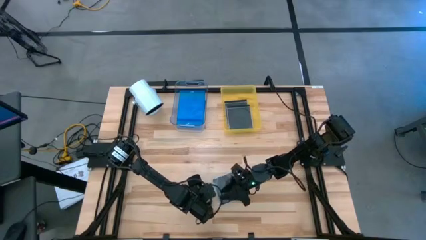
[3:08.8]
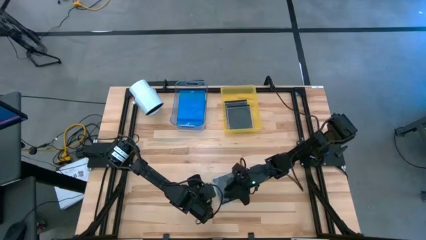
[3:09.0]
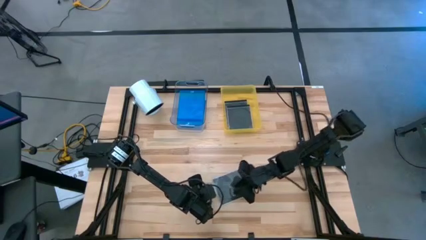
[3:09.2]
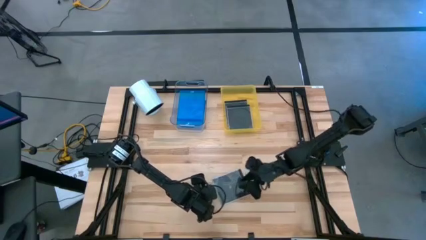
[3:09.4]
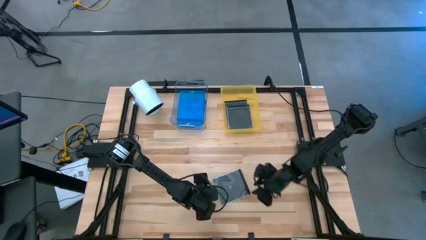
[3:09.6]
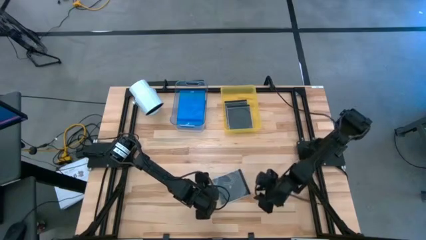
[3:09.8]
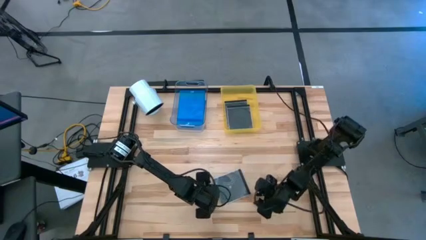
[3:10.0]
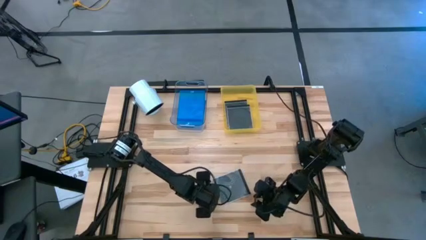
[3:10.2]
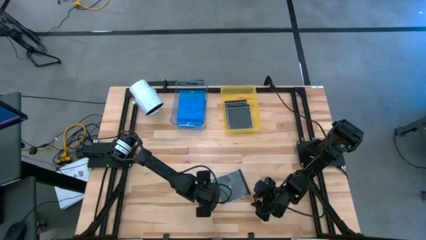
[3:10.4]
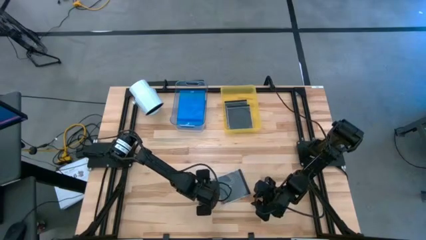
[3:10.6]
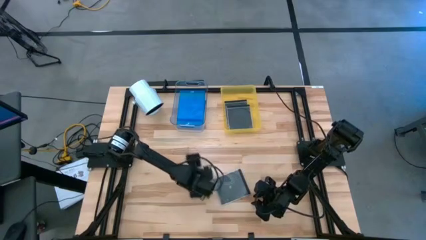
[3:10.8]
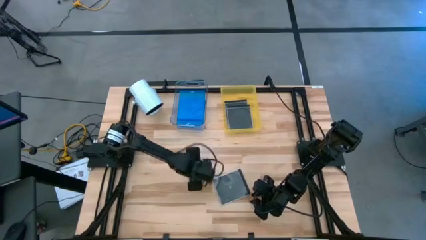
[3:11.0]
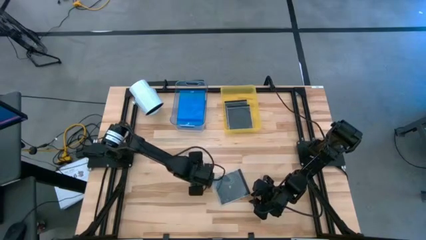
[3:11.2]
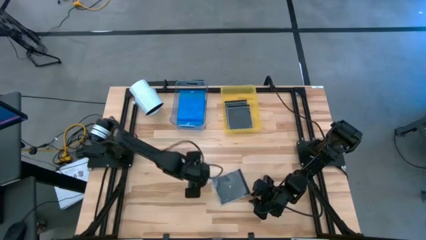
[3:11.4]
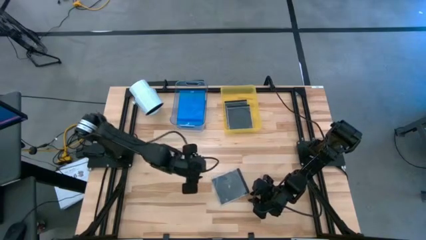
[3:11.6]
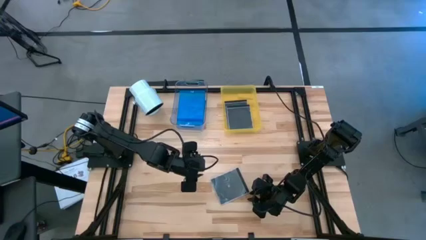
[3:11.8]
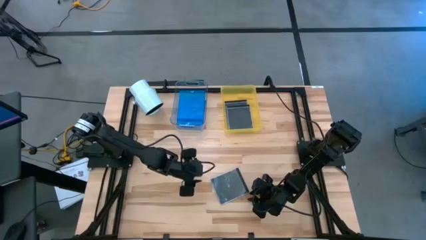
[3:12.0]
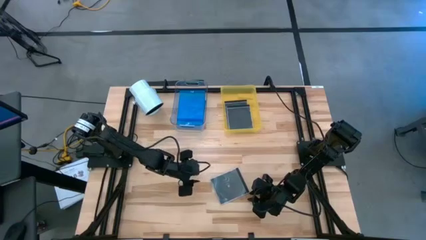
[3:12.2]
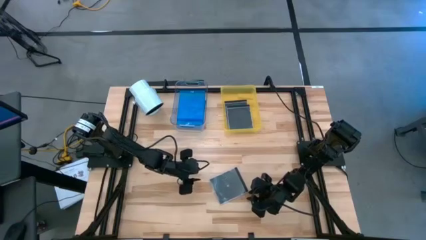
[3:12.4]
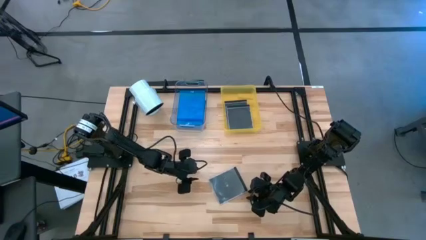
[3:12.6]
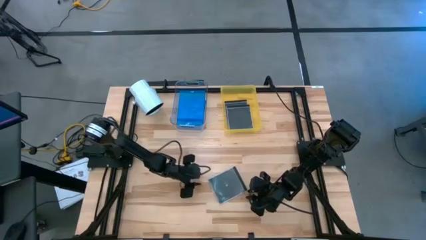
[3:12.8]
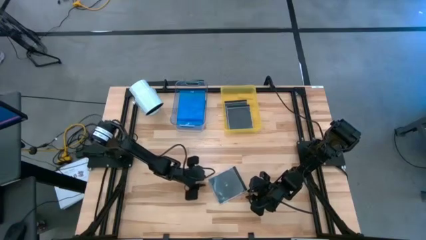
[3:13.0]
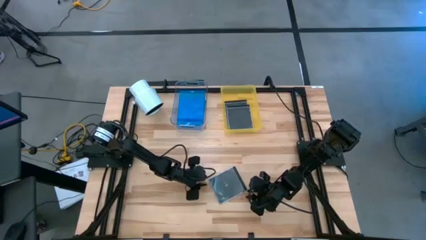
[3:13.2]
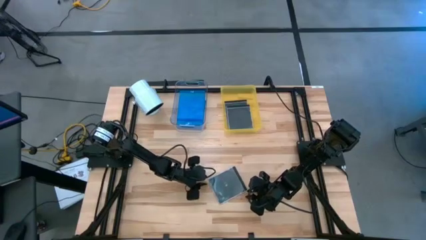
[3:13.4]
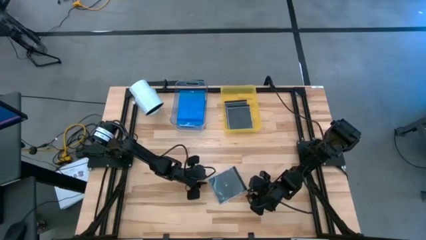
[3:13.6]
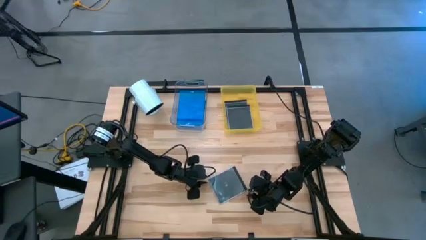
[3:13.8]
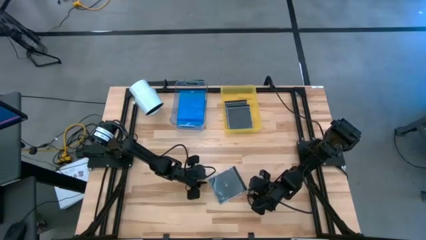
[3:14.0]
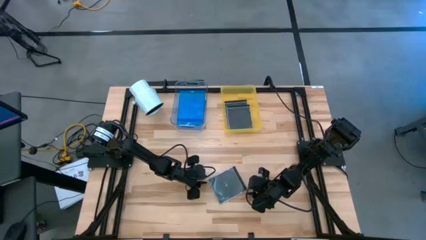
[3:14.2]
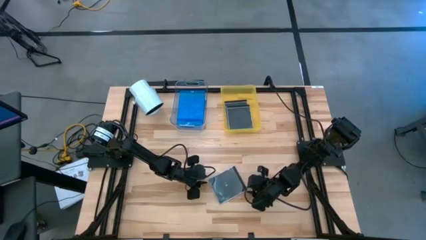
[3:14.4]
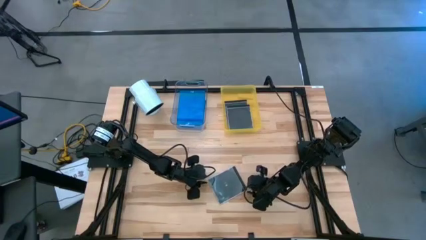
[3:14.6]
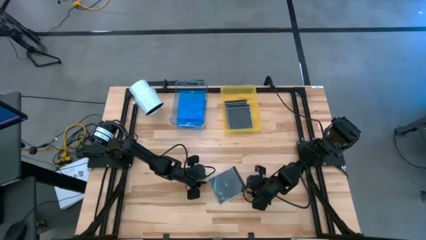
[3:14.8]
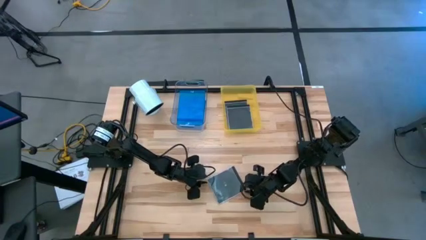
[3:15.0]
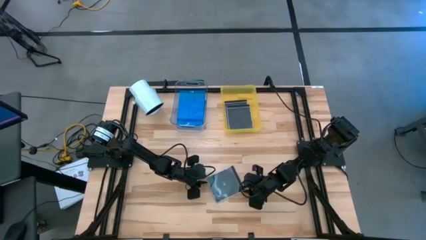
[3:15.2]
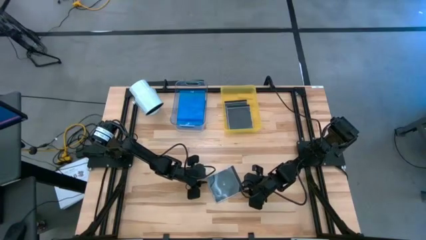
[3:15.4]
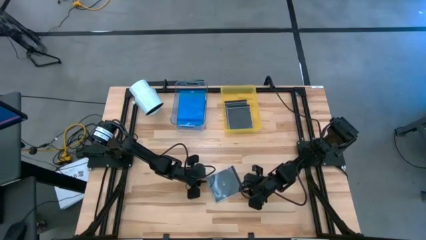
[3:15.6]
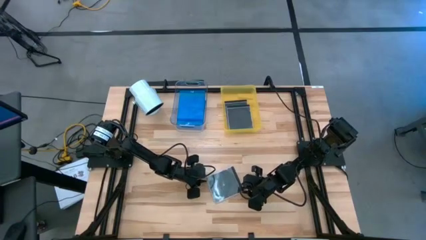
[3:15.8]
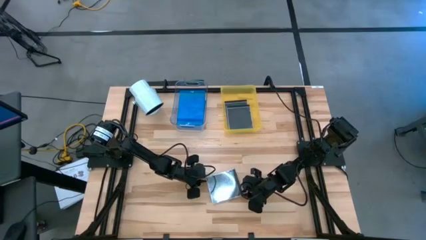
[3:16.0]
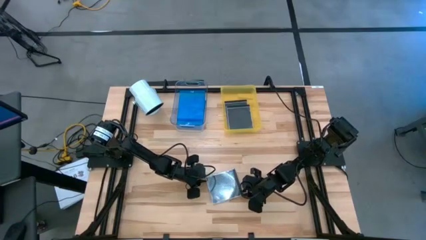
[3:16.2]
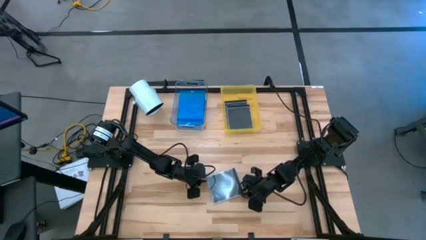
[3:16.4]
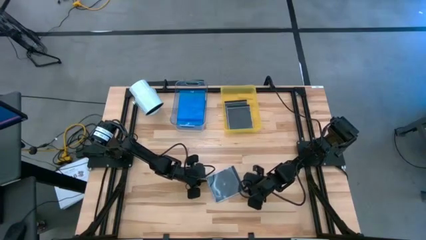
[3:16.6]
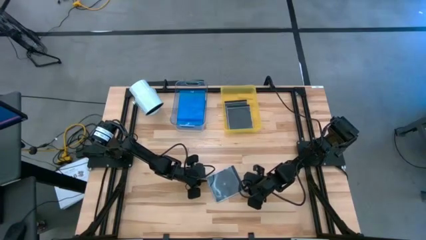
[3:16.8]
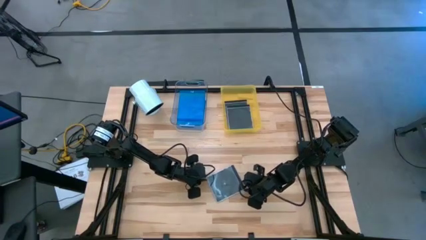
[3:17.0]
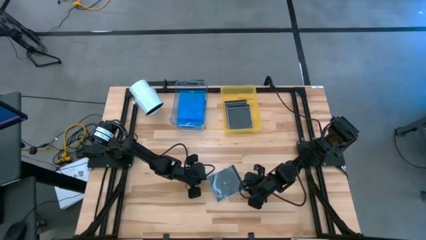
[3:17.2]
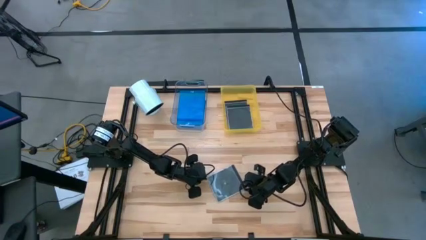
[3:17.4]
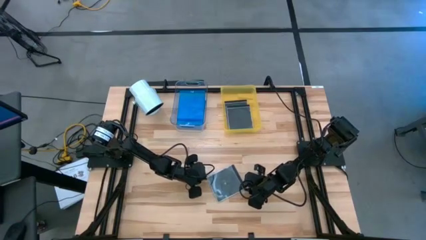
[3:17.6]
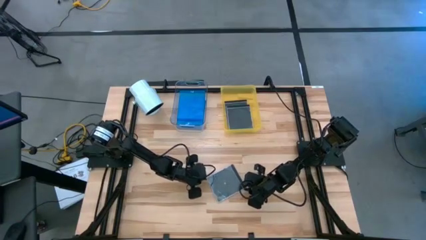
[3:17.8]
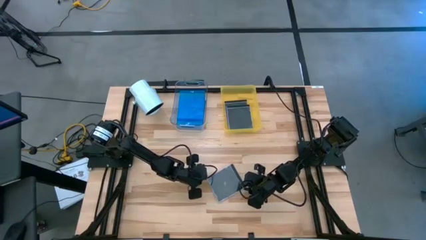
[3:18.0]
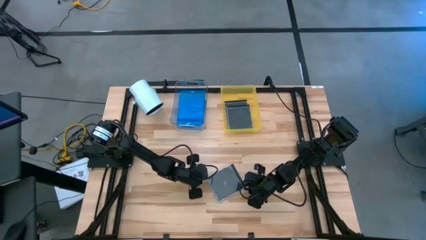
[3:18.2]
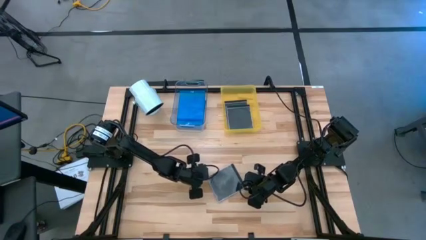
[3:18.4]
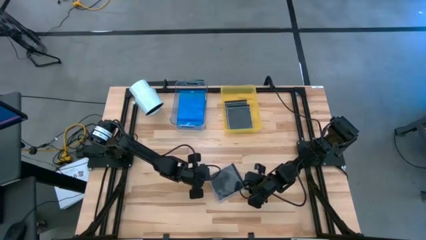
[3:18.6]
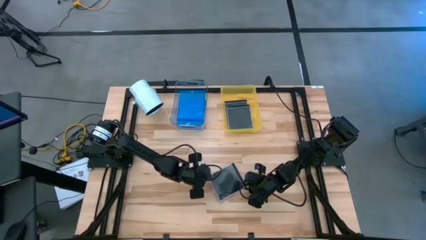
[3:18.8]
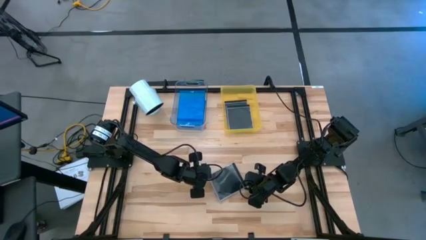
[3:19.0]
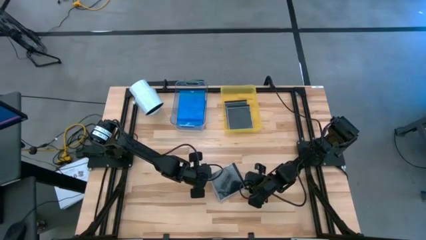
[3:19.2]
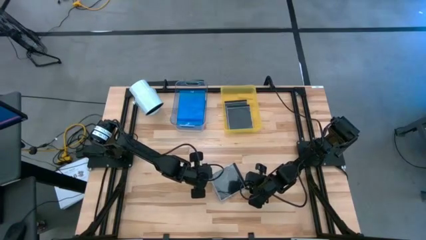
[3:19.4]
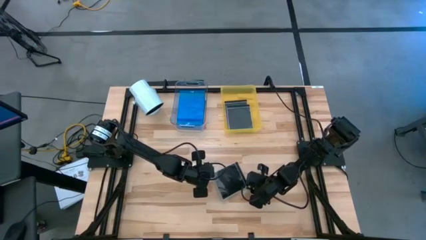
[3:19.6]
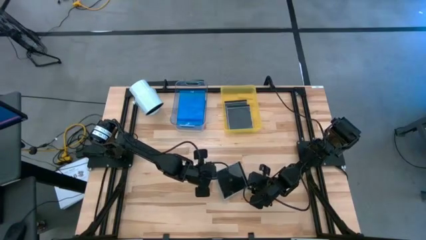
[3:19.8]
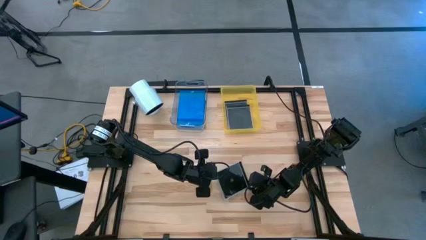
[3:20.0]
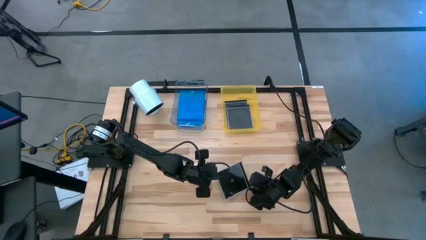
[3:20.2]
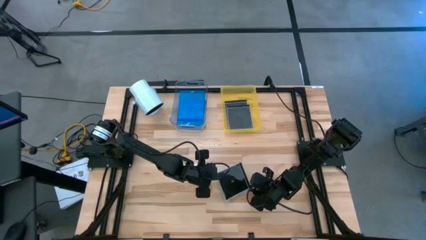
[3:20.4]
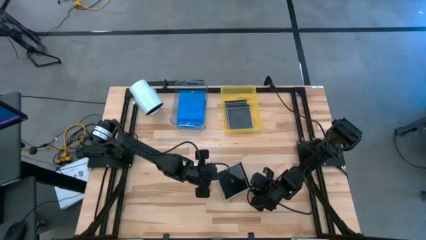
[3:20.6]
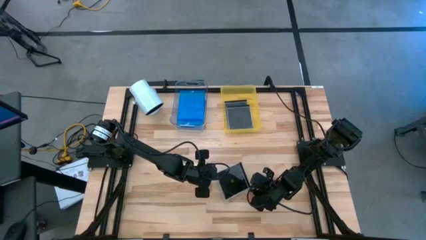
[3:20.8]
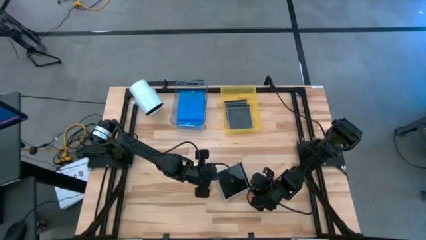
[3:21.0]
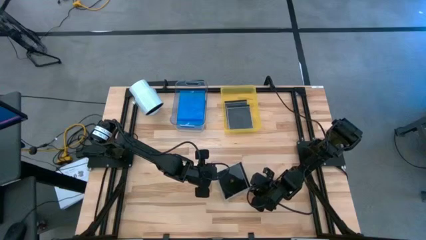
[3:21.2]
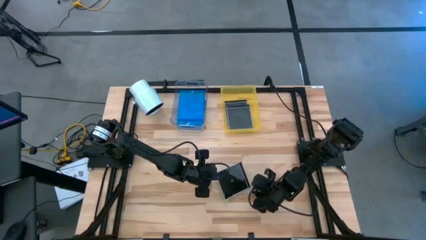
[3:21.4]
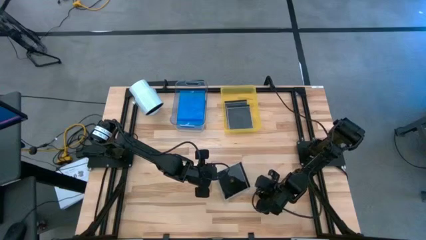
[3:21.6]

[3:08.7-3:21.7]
Task: Pick & place jewel cases by type
Put the black CD case into the yellow bin
